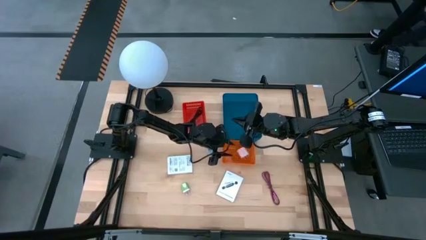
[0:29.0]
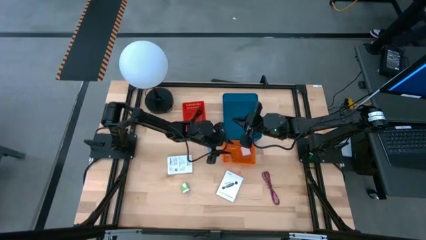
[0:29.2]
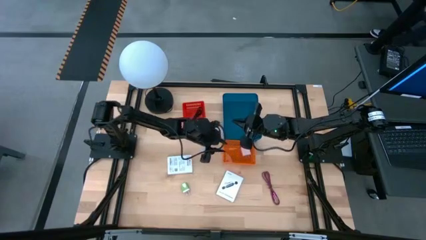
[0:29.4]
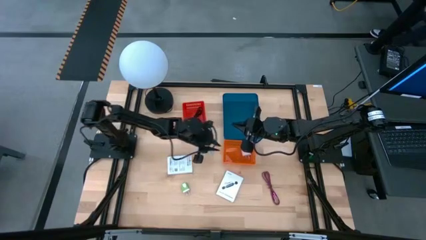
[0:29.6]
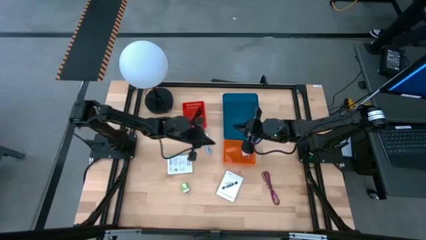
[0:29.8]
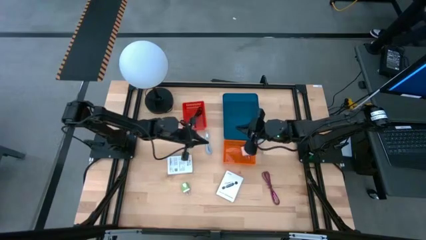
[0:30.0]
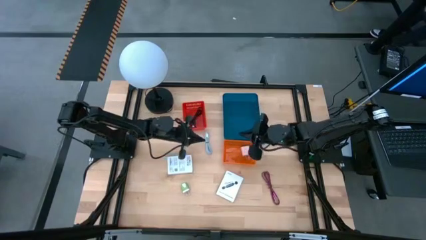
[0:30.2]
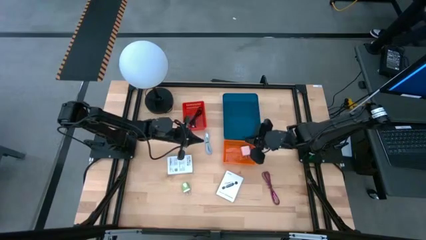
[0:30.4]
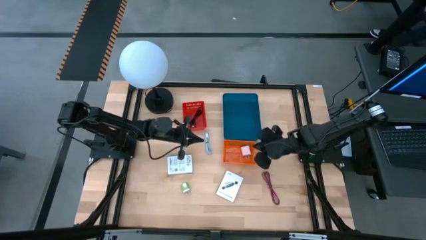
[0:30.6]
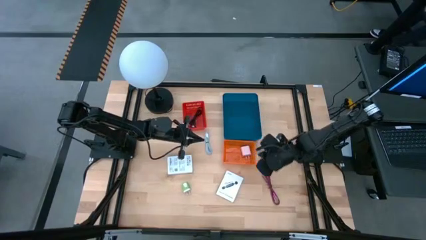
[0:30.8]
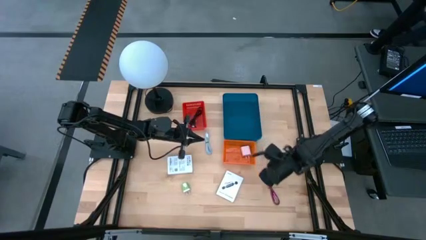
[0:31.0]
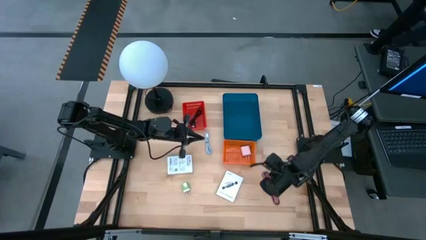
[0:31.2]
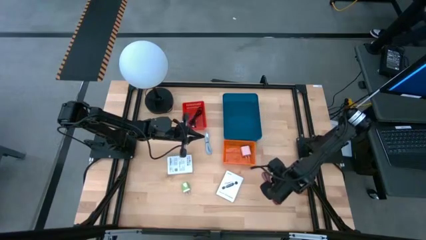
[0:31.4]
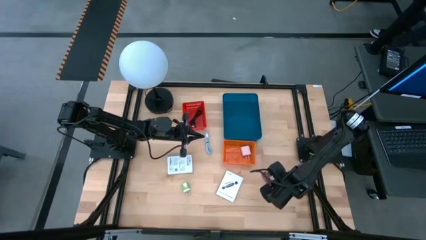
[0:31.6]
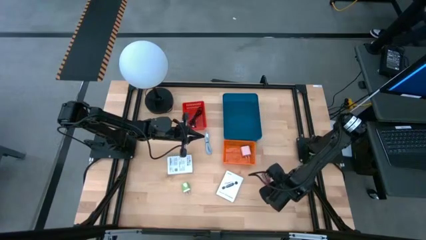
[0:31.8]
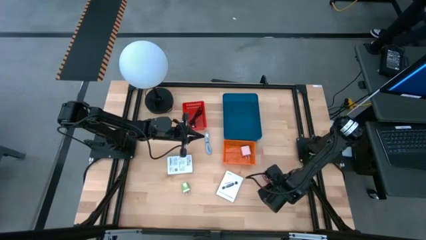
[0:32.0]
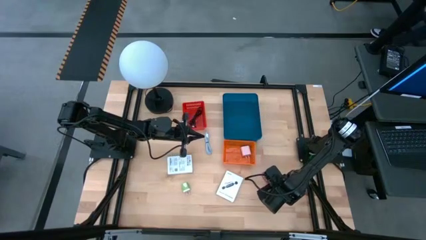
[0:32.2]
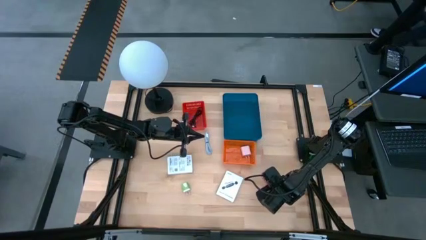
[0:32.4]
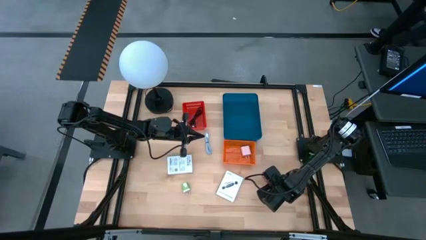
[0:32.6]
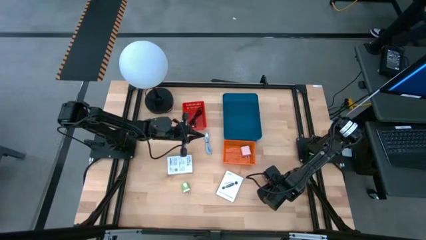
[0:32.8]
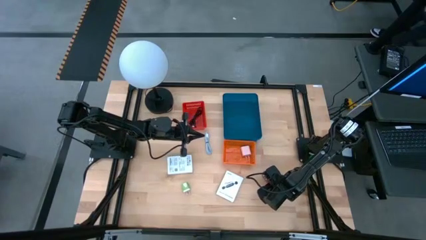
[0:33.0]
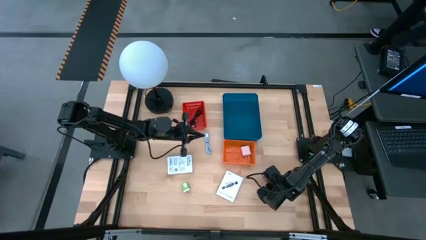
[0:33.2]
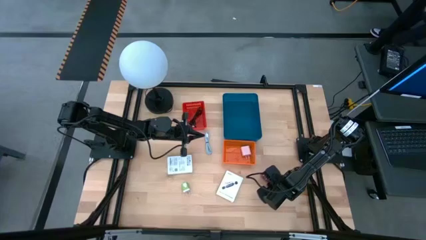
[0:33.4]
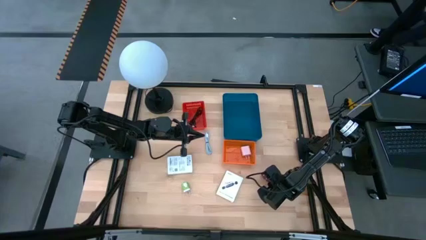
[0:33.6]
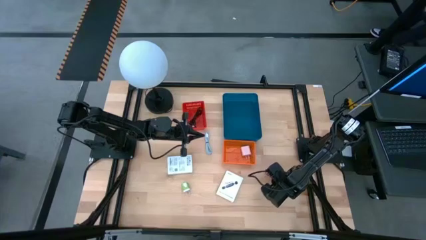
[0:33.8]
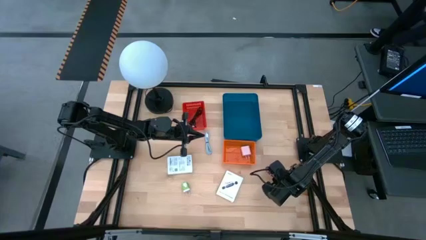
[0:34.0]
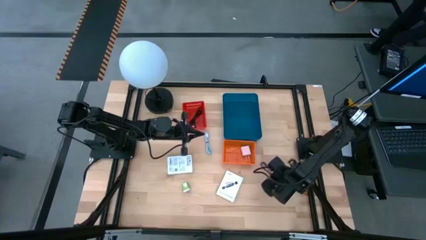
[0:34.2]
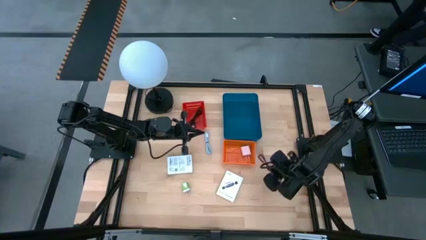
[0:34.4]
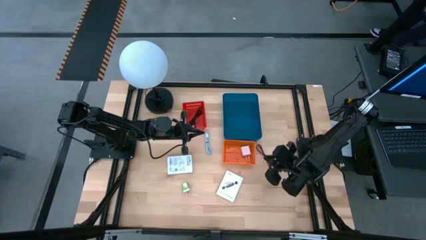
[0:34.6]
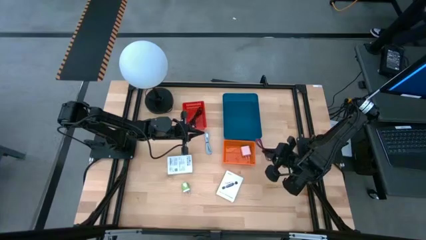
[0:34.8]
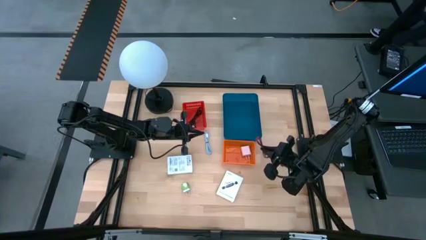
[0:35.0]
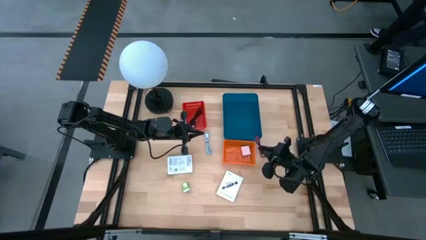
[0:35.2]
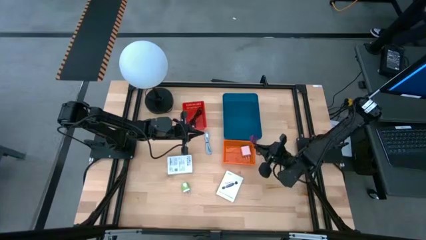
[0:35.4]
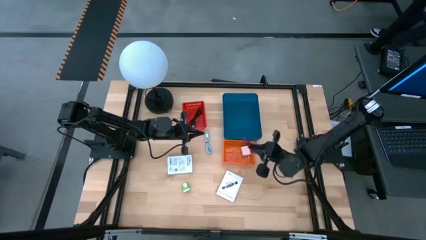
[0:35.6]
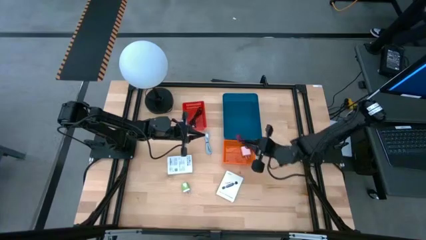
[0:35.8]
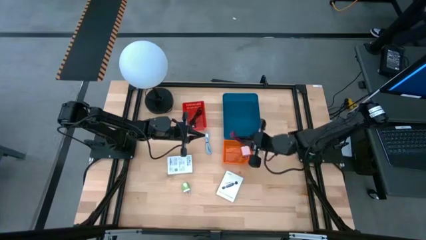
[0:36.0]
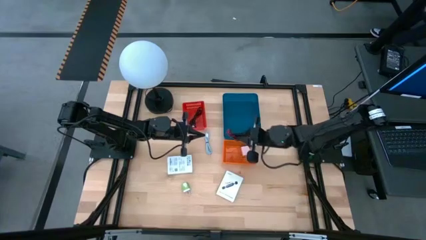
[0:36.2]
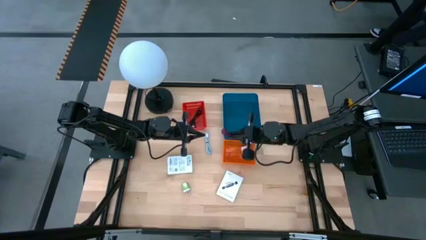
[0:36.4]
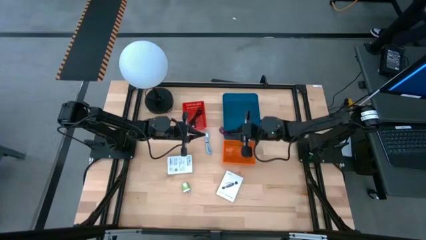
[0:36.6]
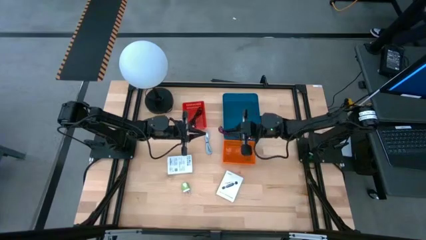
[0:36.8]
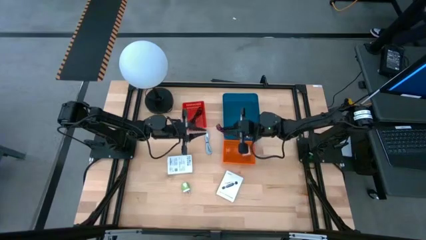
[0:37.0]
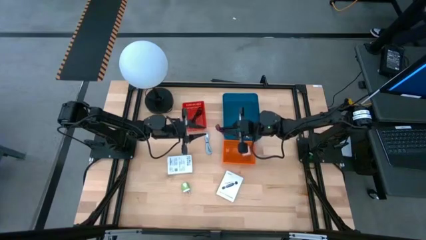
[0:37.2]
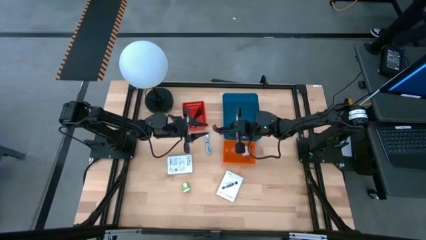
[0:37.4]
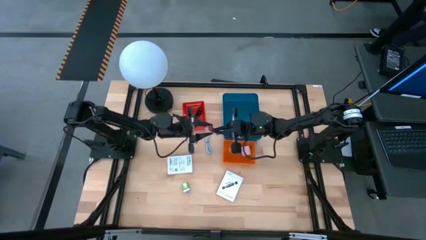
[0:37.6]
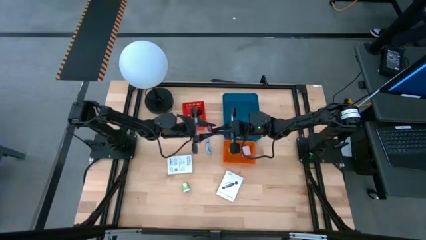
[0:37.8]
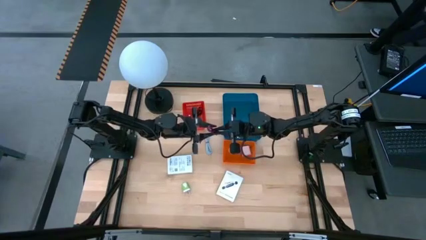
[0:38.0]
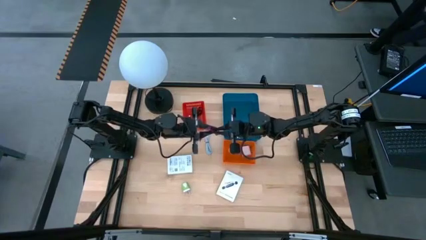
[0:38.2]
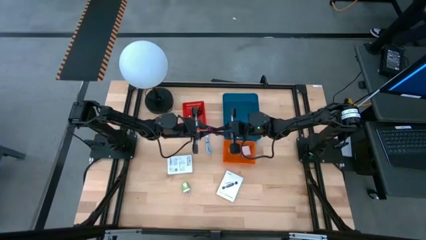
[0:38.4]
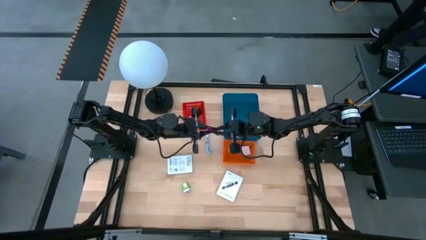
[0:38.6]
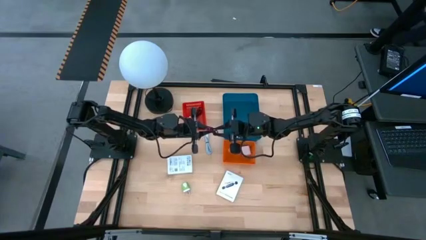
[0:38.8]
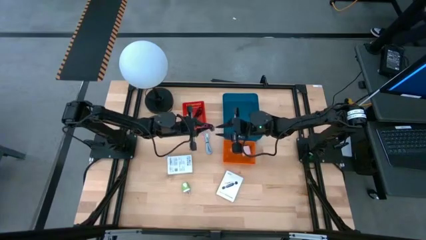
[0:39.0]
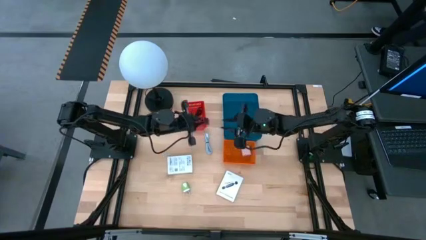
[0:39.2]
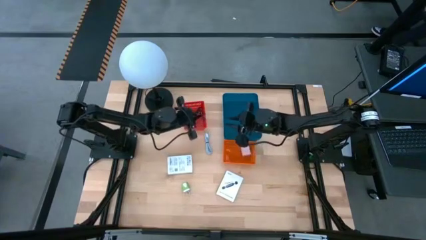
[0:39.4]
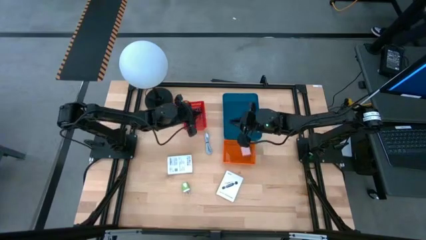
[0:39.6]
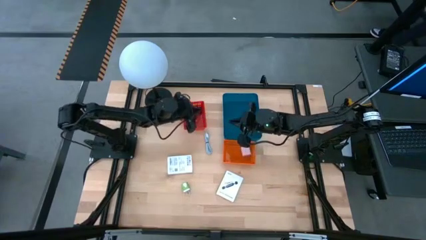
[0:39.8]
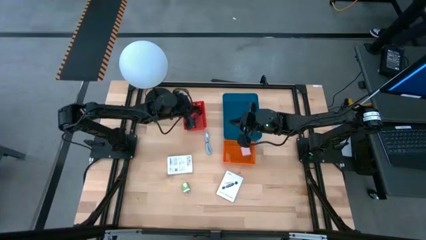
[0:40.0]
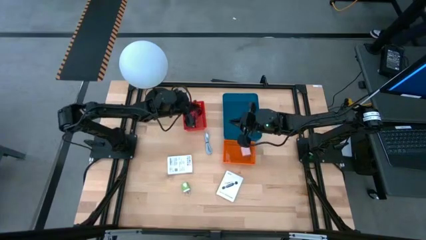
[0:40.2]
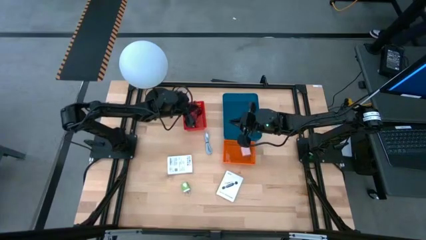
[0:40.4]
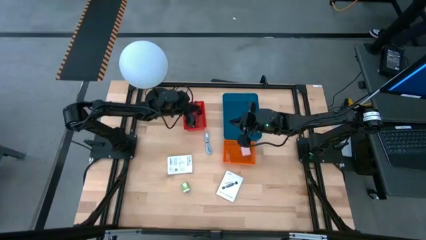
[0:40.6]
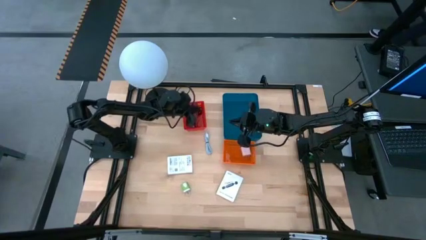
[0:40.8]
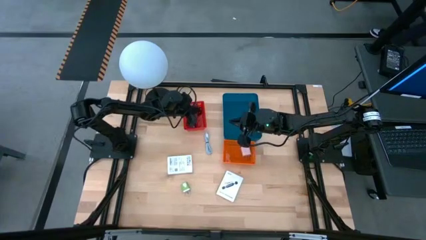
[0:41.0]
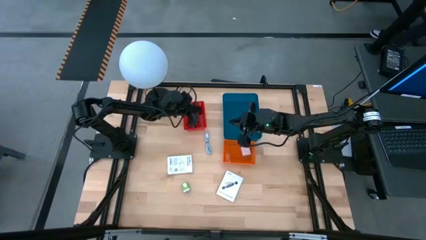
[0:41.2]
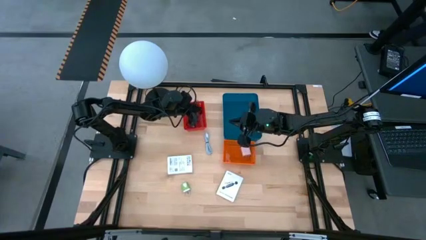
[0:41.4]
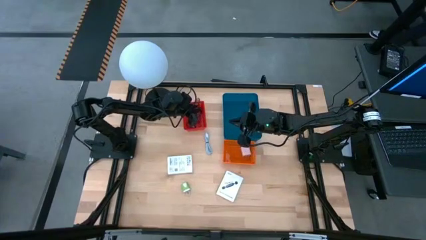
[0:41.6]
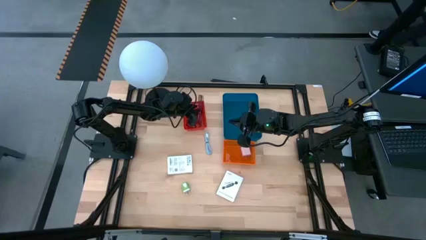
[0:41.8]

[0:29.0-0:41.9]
Task: Pick and place items into bin
Put the pink charger cable into the red bin
